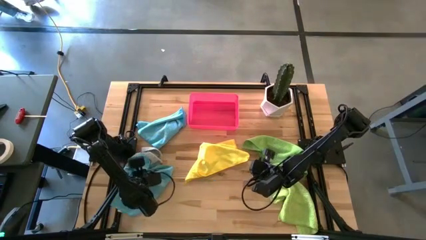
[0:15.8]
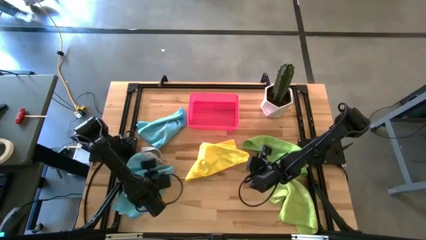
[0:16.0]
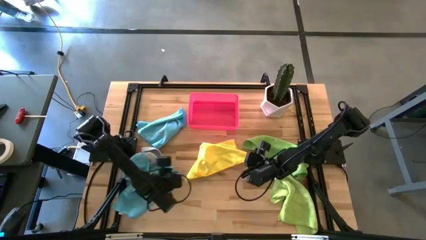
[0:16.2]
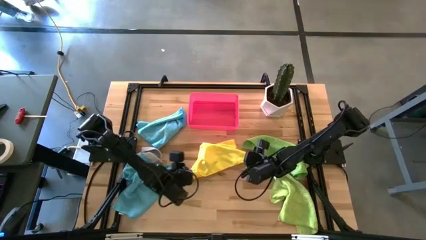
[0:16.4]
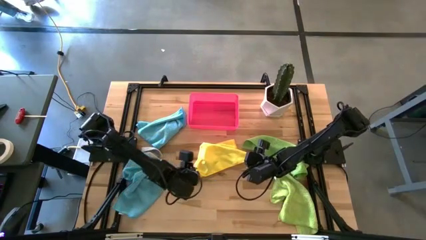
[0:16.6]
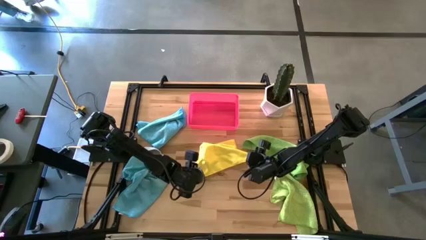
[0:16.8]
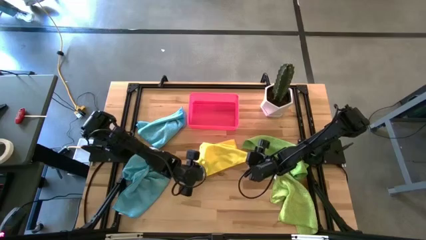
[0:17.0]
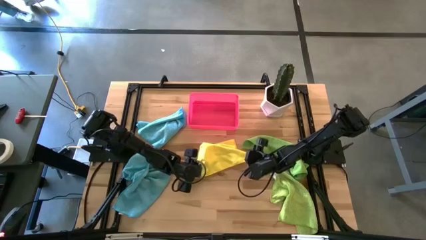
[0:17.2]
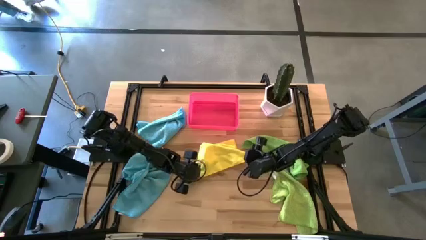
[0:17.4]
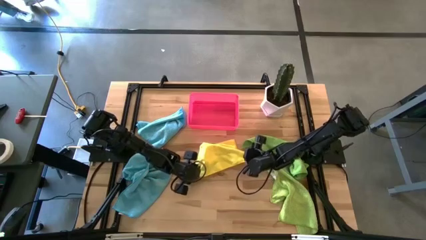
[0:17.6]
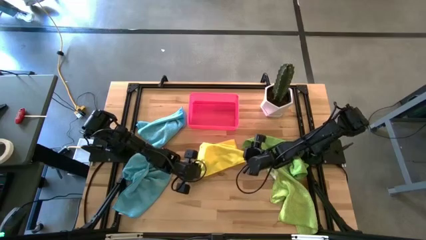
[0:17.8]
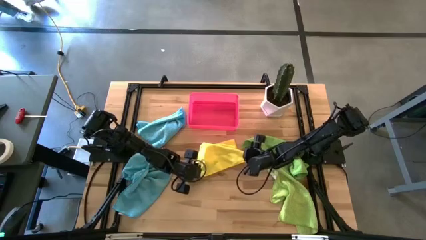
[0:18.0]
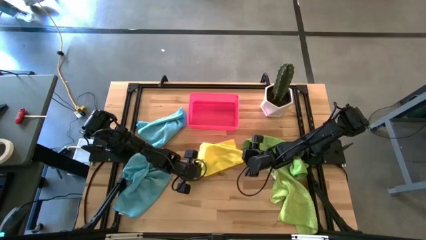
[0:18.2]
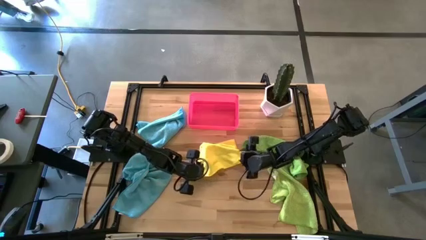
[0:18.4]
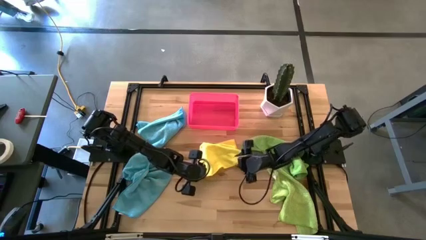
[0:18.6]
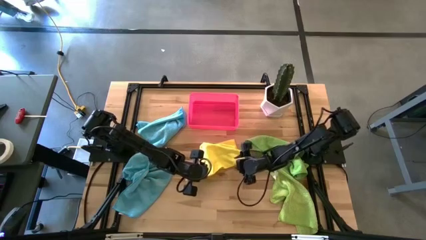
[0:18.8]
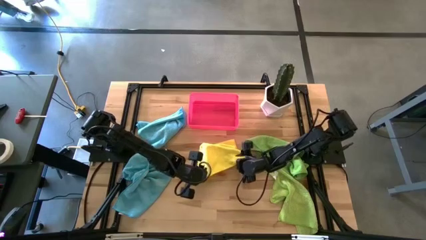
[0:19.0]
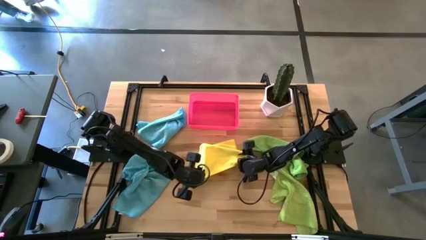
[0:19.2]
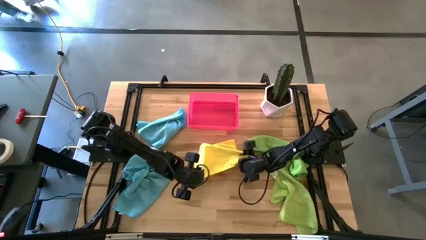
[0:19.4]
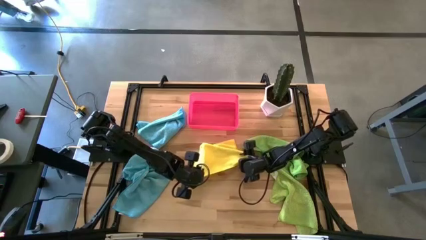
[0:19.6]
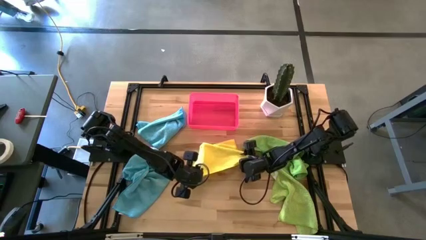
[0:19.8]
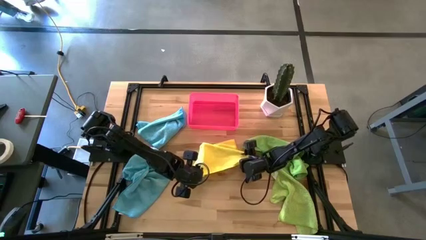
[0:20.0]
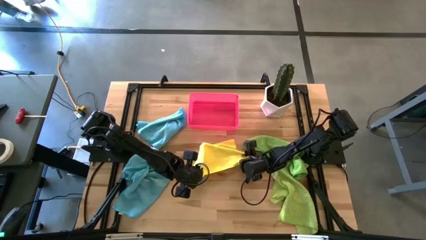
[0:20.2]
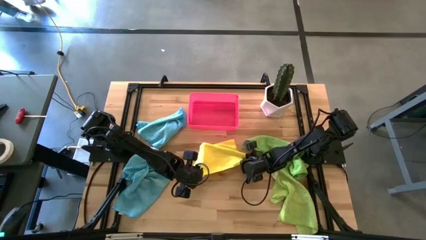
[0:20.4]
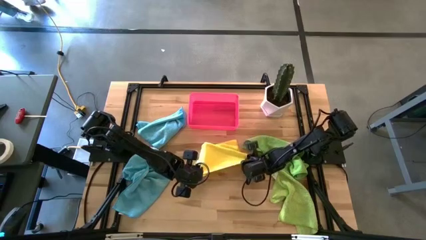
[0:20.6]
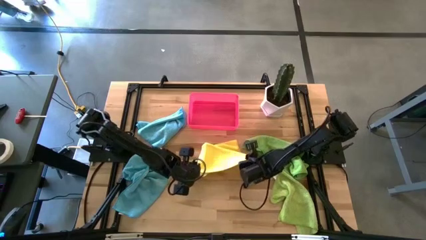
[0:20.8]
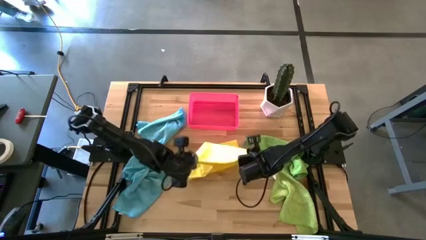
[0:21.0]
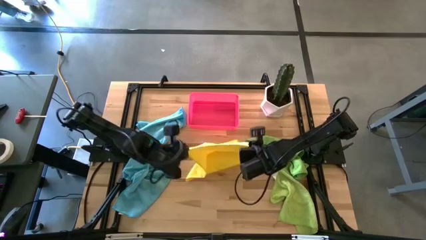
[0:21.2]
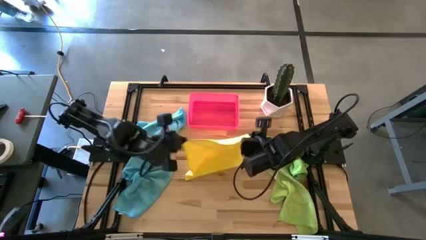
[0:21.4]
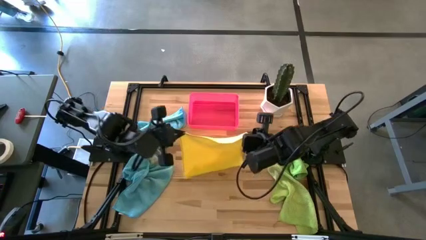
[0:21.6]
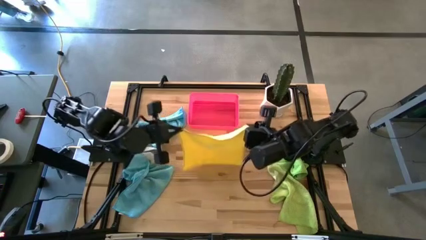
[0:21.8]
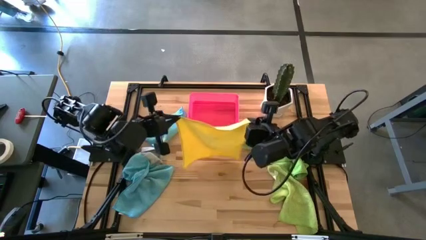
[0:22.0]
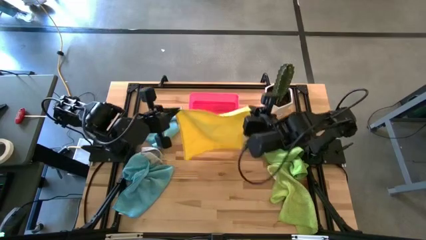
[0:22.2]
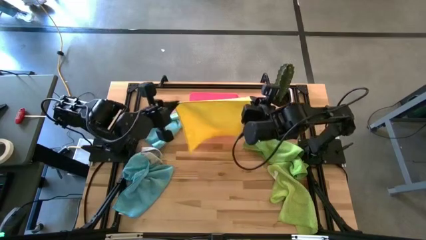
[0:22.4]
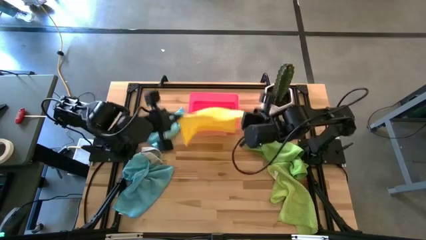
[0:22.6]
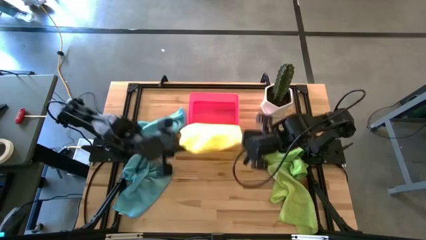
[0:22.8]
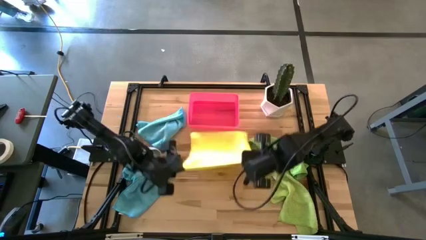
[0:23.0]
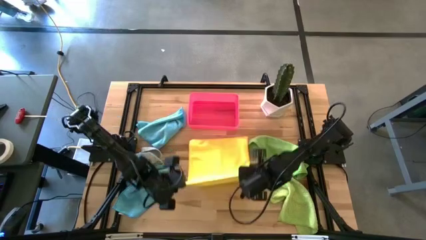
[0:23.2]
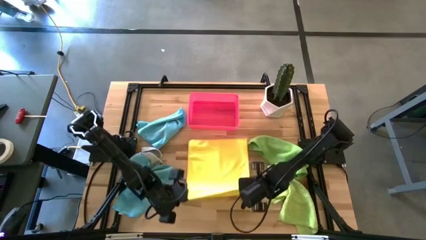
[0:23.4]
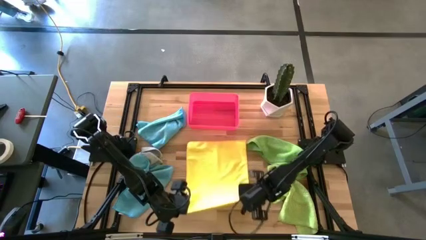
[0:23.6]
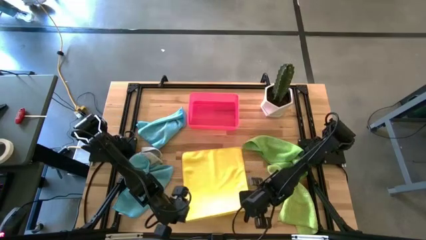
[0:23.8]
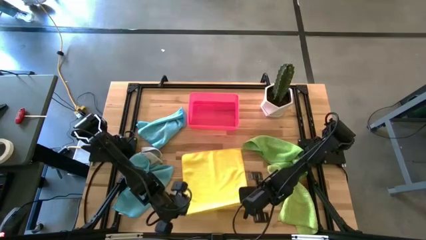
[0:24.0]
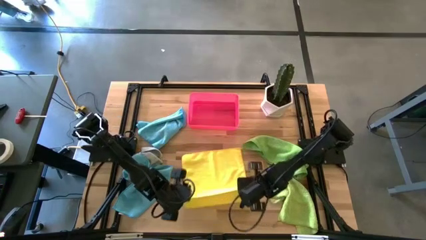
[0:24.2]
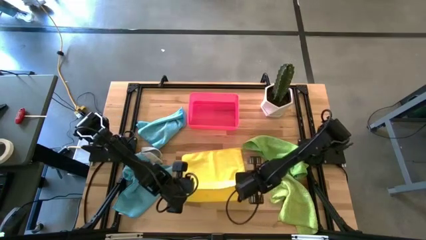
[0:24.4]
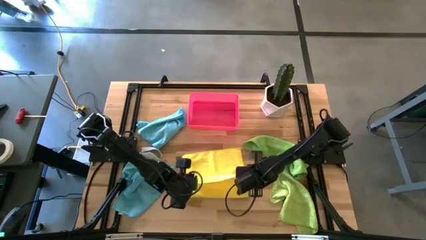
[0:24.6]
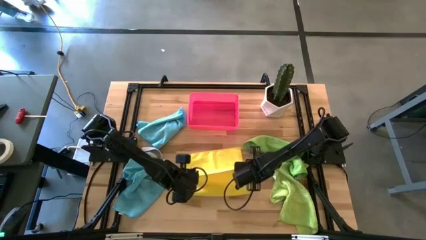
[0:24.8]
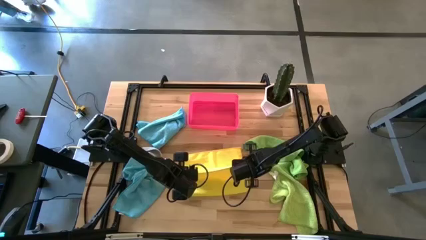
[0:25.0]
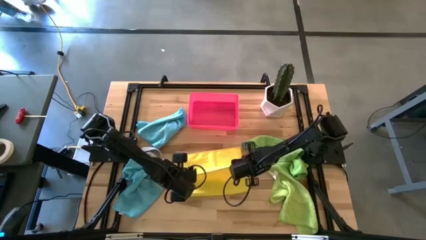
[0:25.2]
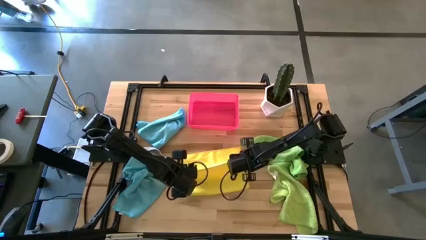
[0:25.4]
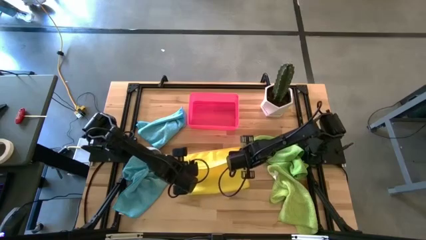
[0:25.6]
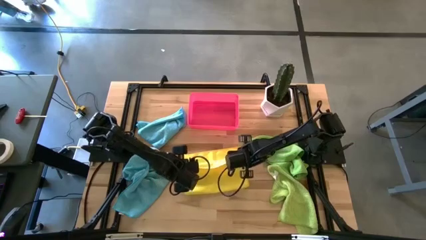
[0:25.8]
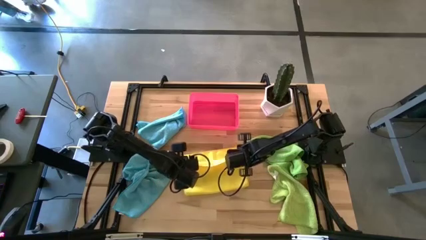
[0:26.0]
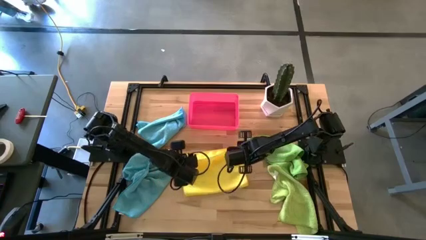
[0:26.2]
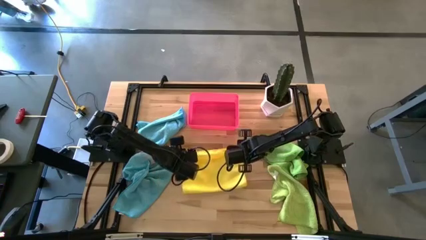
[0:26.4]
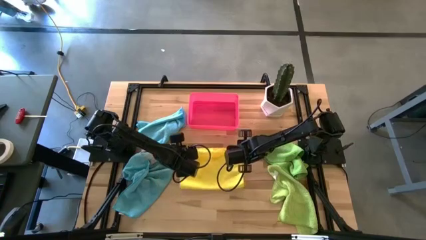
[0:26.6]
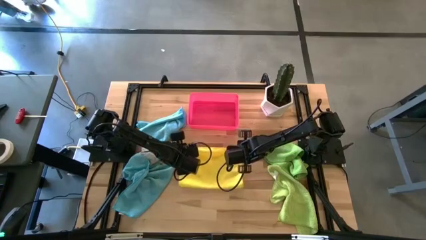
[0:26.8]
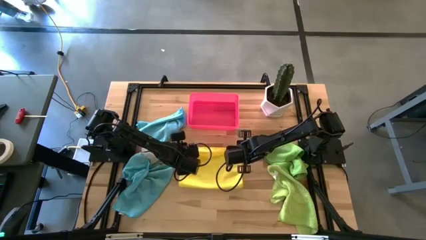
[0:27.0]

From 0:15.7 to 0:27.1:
Task: Fold microfiber towels
Fold the yellow microfiber cloth

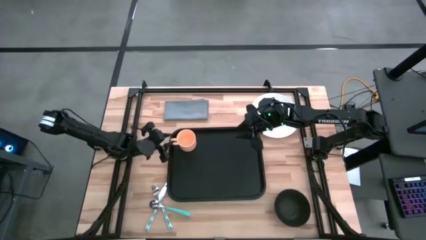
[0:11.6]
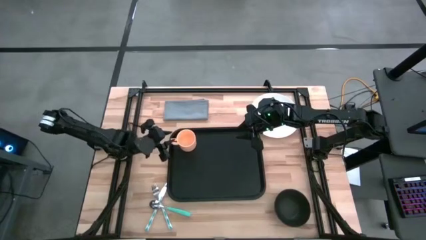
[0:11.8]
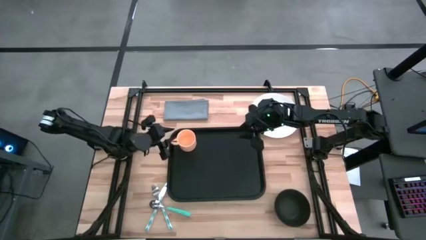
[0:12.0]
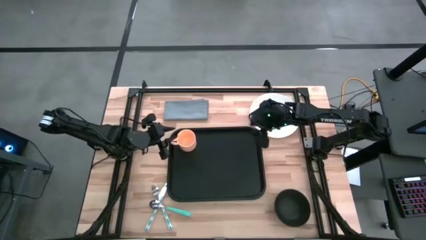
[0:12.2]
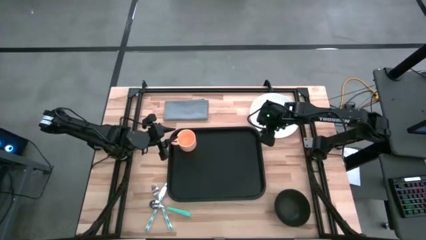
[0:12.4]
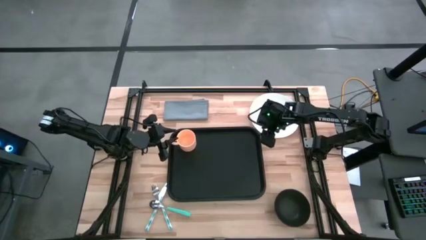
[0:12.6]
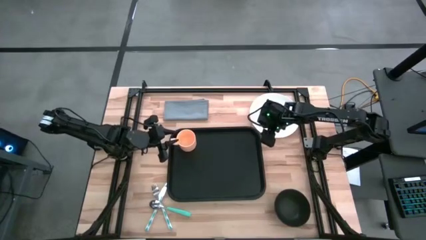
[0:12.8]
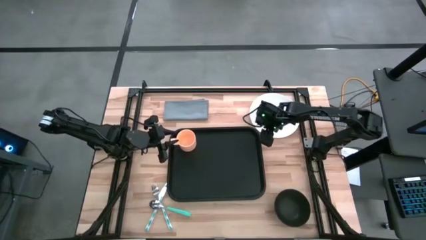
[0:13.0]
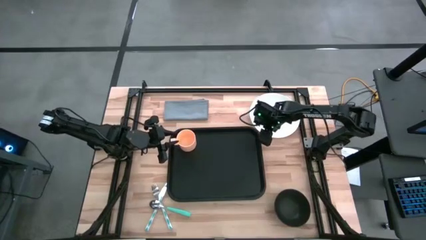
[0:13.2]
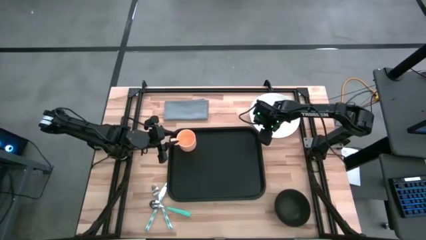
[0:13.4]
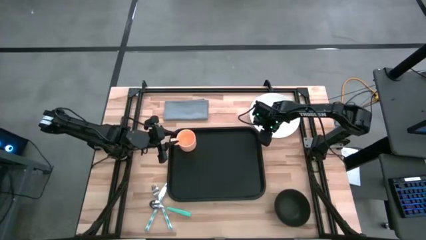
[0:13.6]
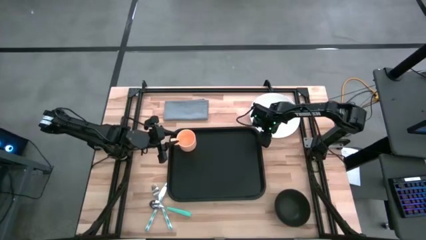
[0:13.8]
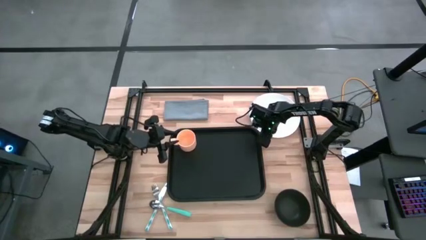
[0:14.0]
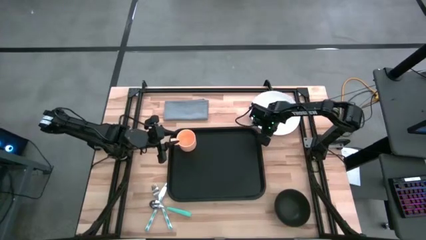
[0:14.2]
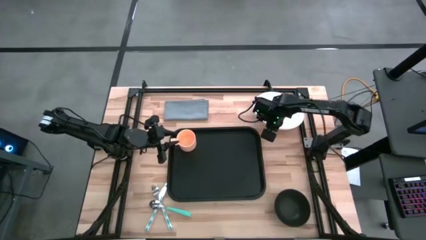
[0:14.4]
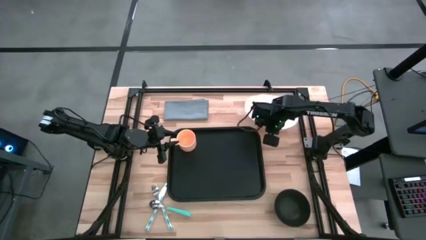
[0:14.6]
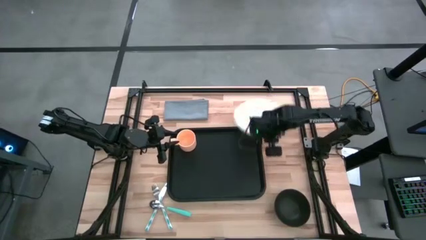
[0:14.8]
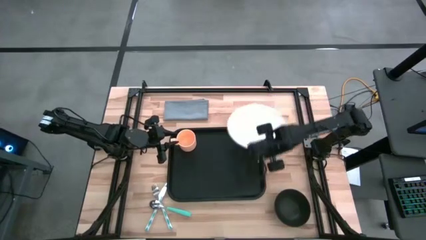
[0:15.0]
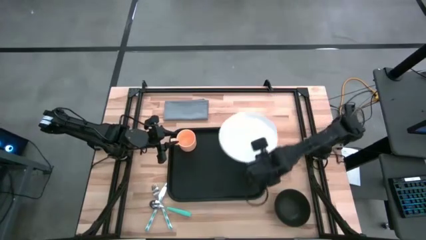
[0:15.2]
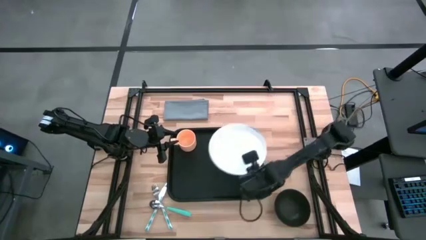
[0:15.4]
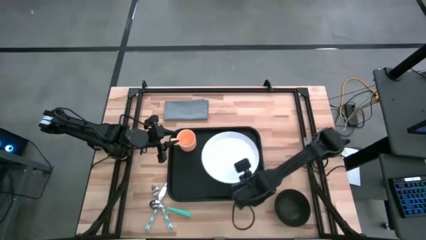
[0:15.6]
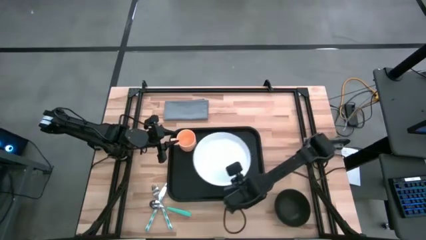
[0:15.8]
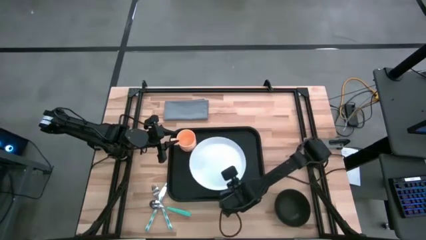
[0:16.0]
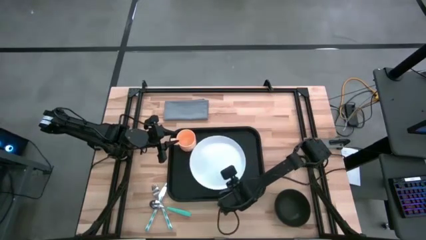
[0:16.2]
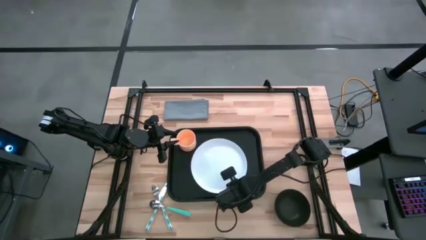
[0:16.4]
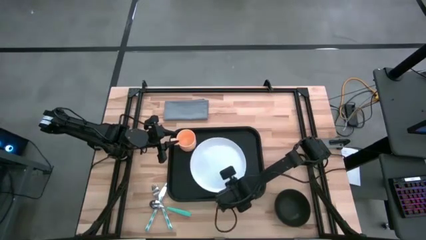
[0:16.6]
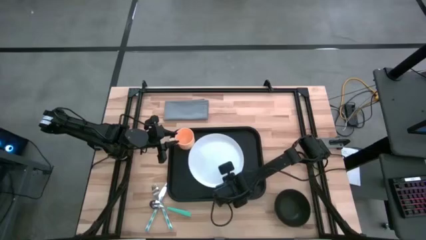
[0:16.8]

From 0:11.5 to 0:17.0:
Task: Set up tray
Put the white plate to the bottom right of the orange mug on the black serving tray
